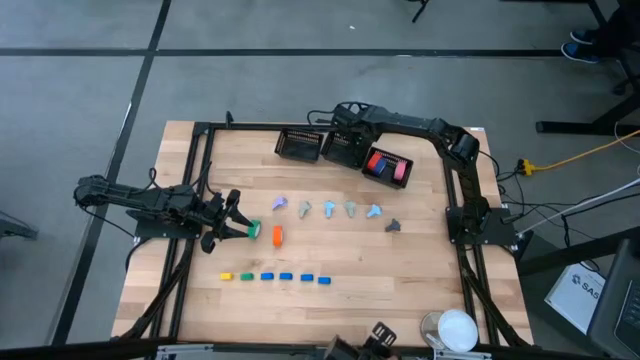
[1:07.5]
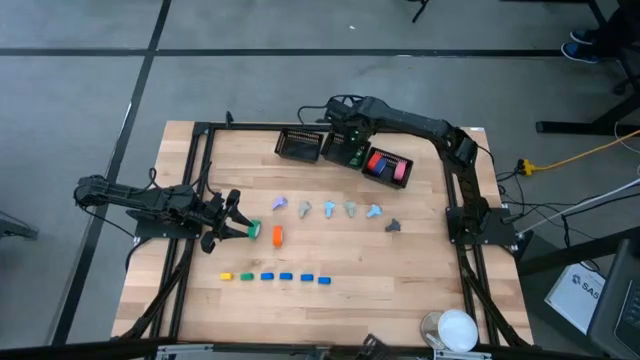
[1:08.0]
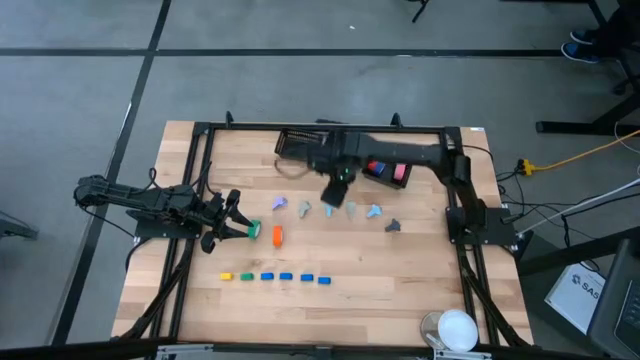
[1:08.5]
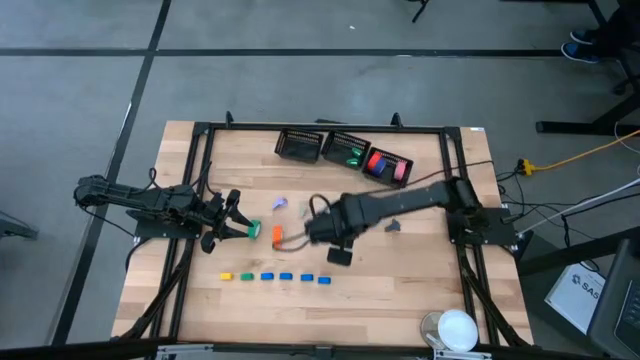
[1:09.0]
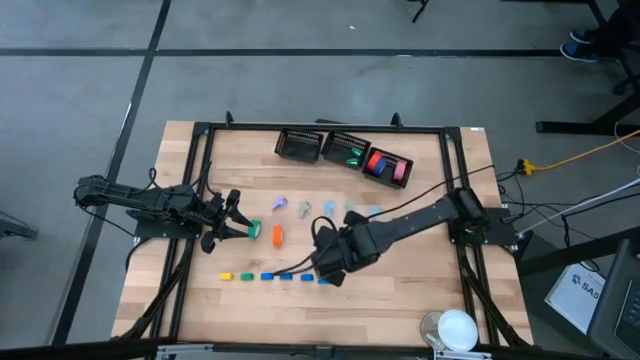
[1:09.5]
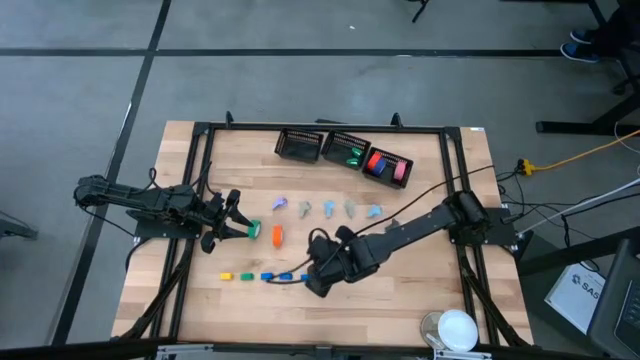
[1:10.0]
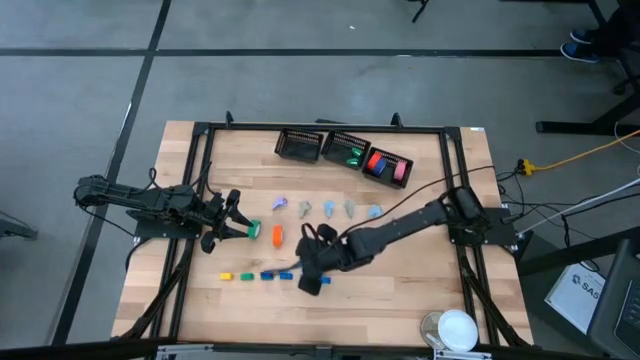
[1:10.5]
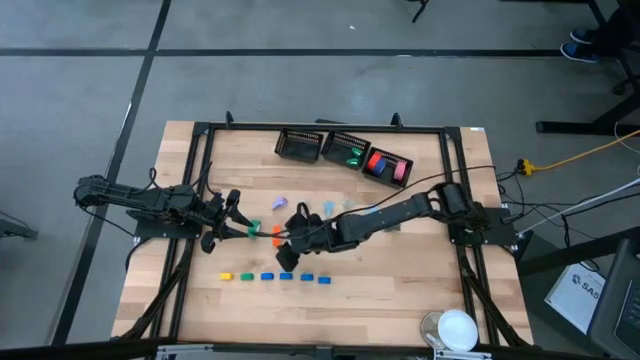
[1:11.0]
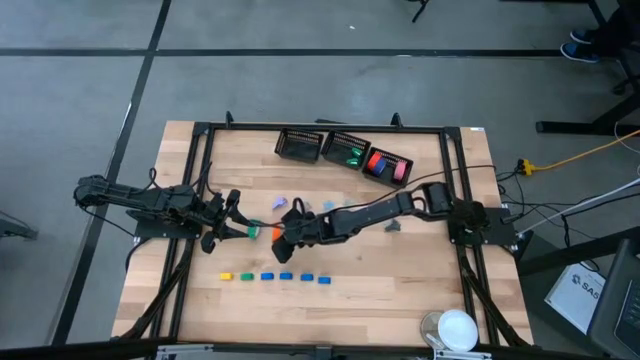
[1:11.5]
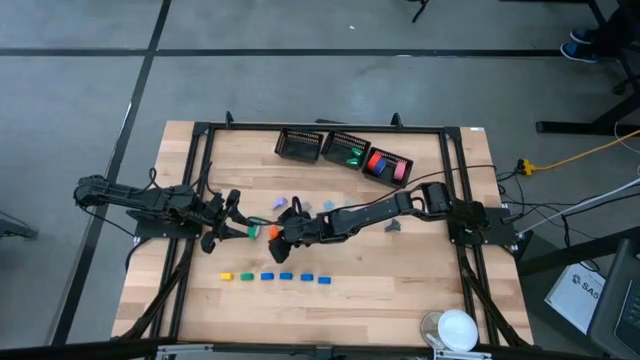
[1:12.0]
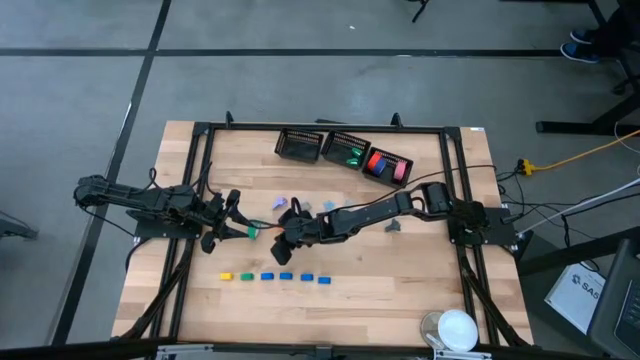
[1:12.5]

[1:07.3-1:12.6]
Task: Pick and place Stapler, Stapler remover, tape
Put the orange tape into the right black bin

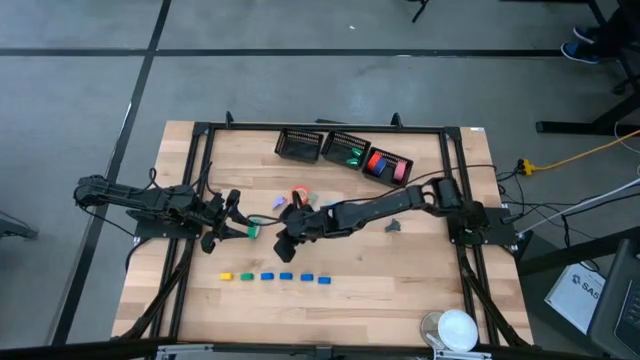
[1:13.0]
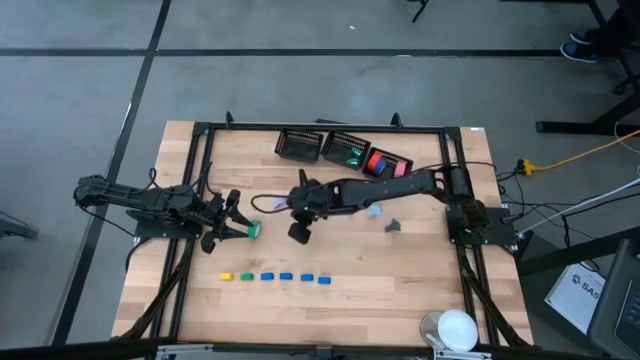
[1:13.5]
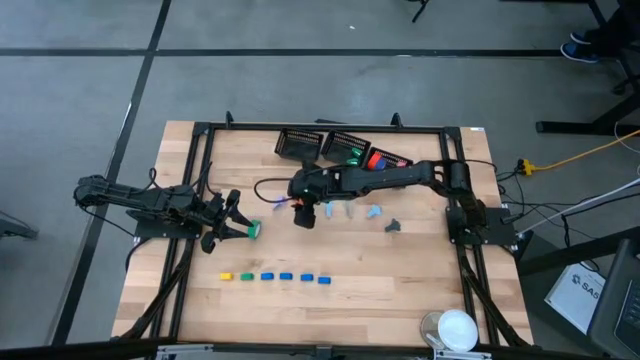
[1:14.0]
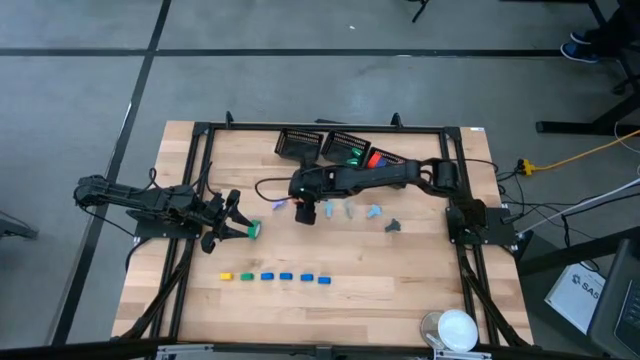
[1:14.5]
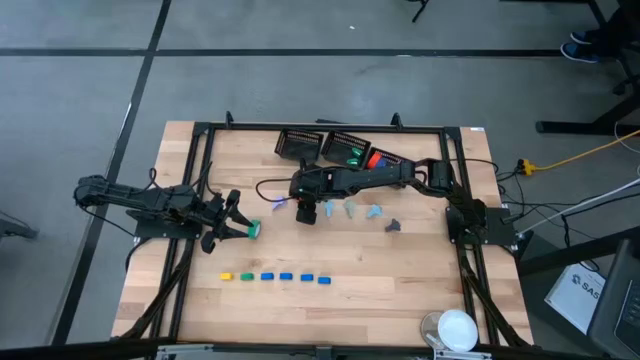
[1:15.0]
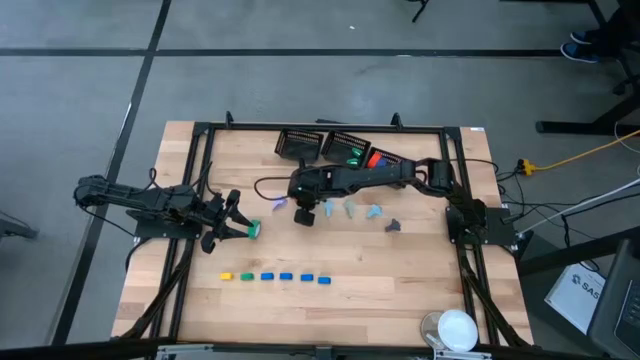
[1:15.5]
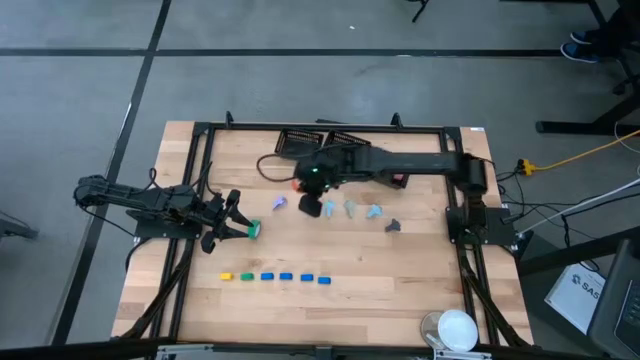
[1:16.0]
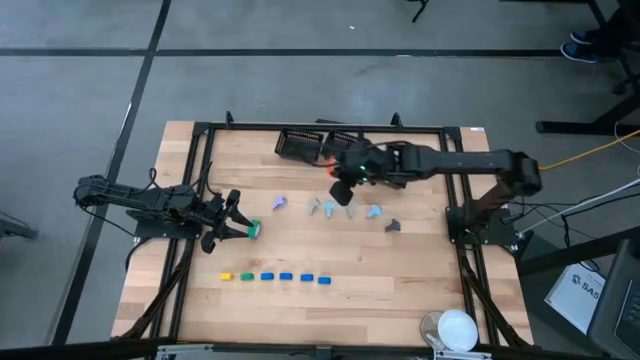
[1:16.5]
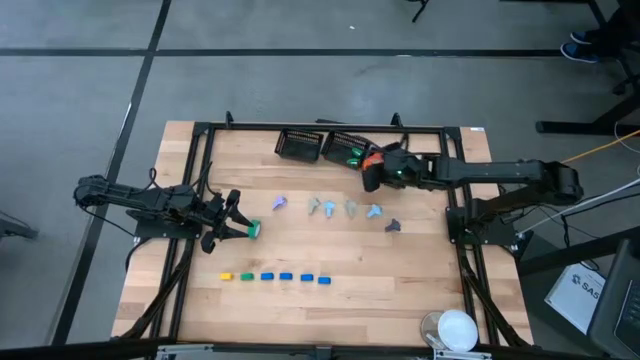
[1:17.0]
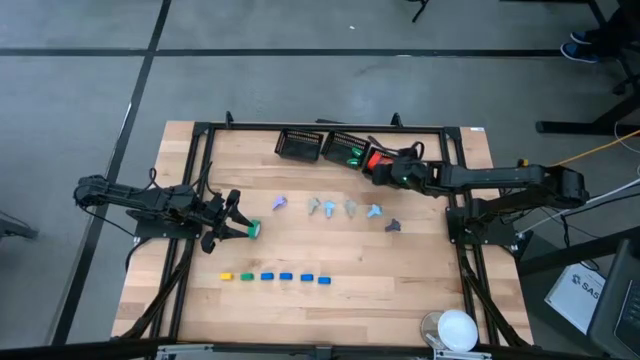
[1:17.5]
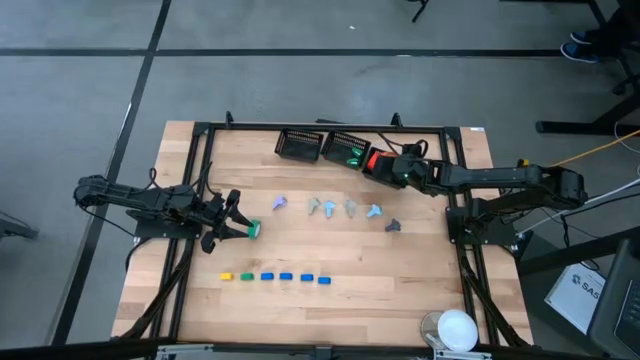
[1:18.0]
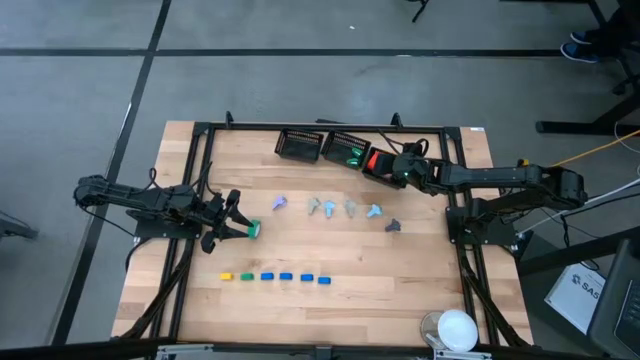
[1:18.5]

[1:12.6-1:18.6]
Put the orange tape into the right black bin

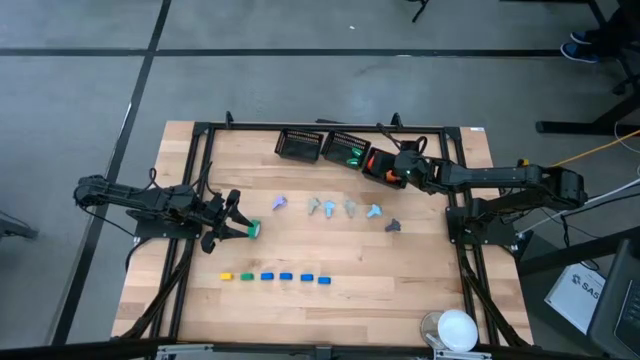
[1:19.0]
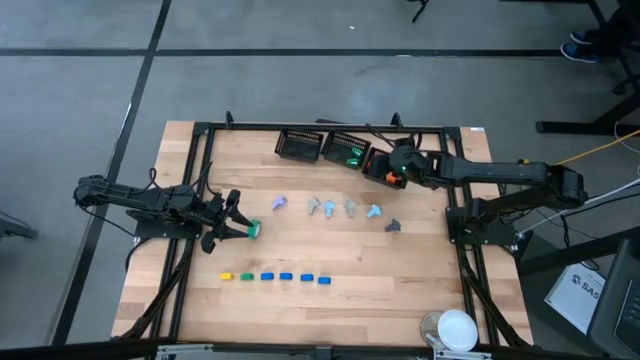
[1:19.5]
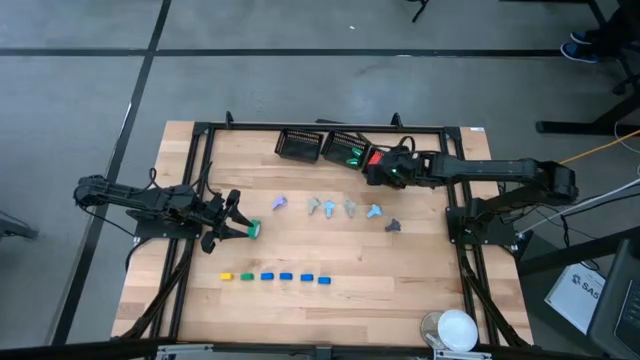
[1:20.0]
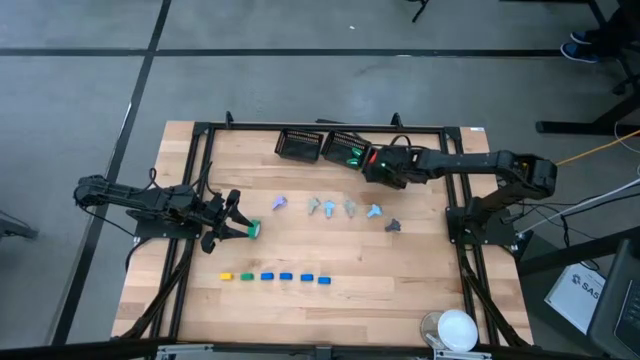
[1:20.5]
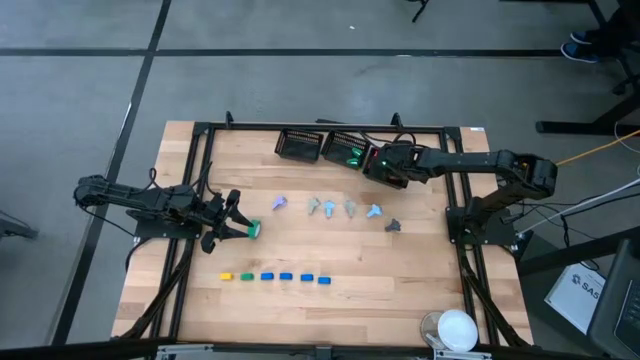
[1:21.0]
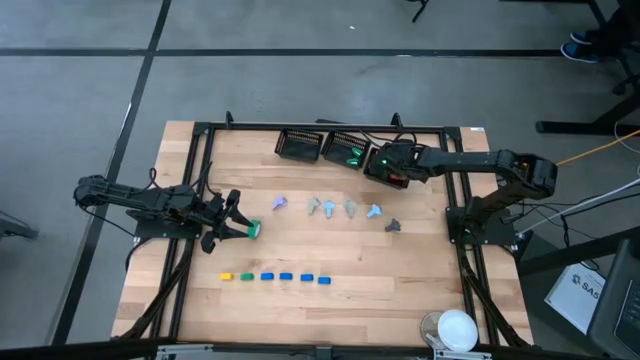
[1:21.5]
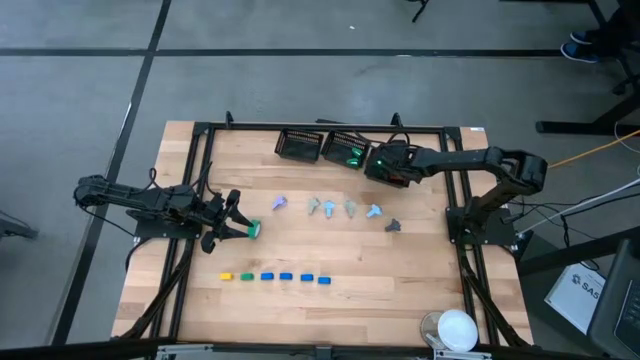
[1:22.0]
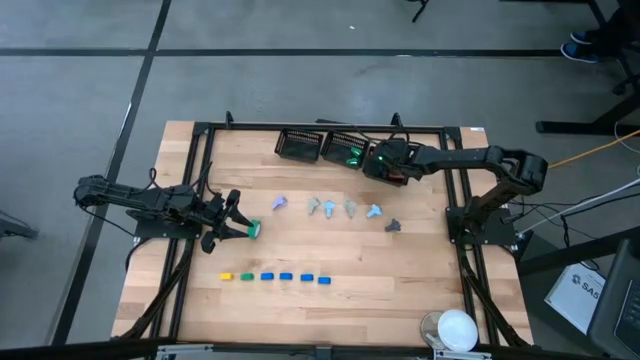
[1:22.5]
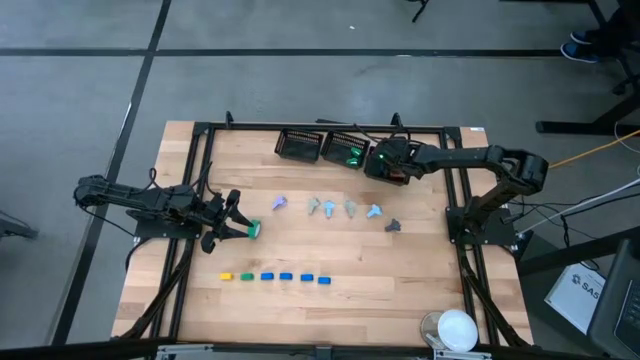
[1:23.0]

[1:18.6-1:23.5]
Adjust the blue tape in the right black bin

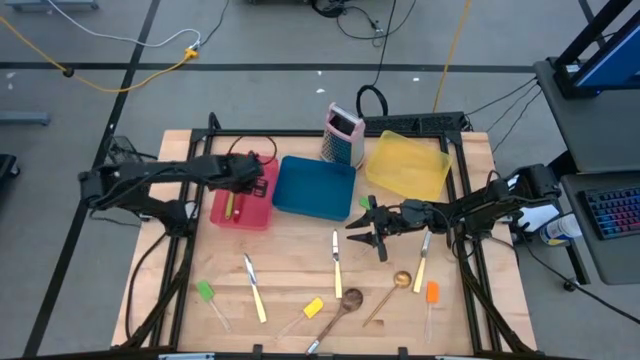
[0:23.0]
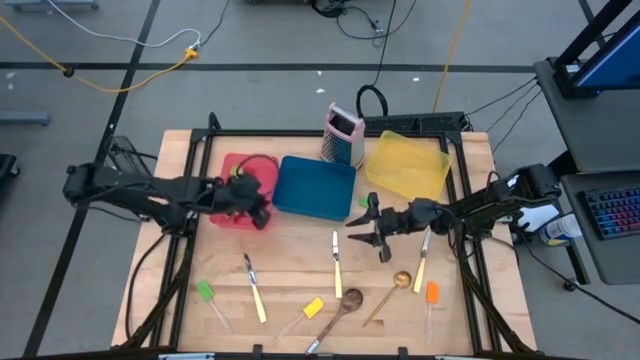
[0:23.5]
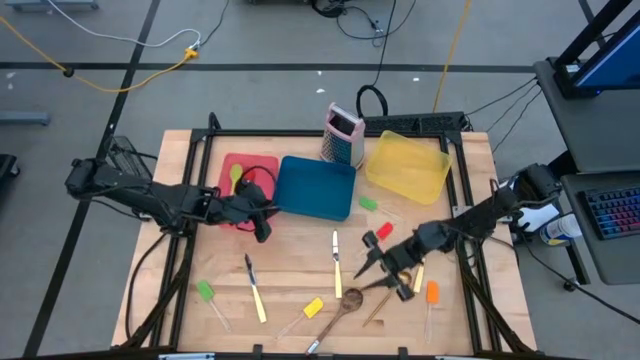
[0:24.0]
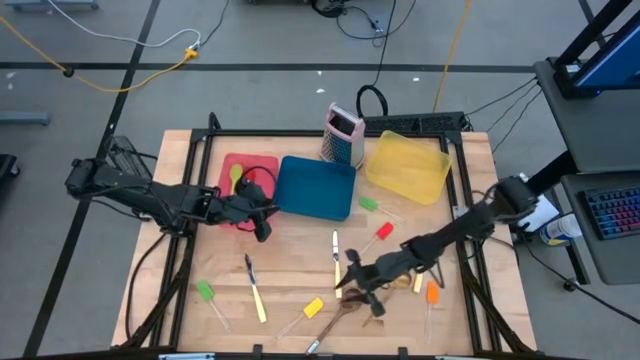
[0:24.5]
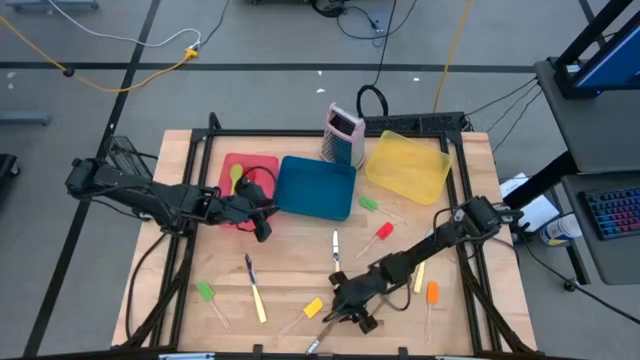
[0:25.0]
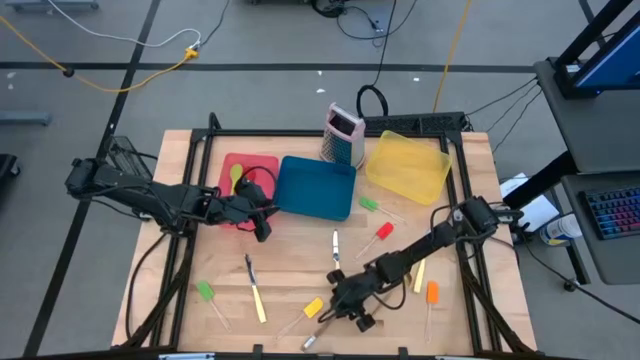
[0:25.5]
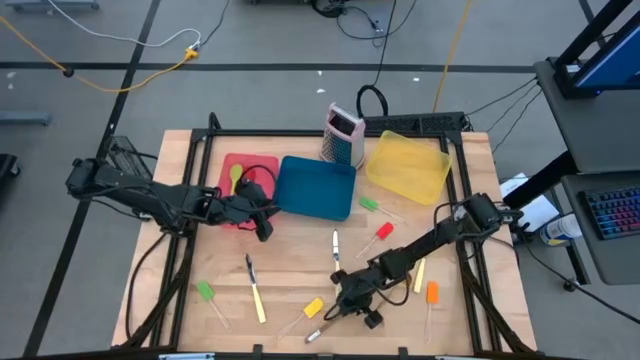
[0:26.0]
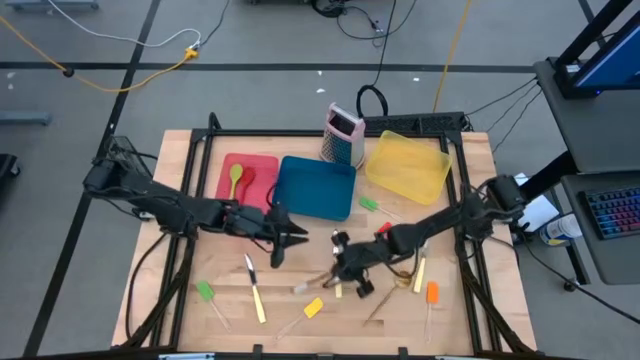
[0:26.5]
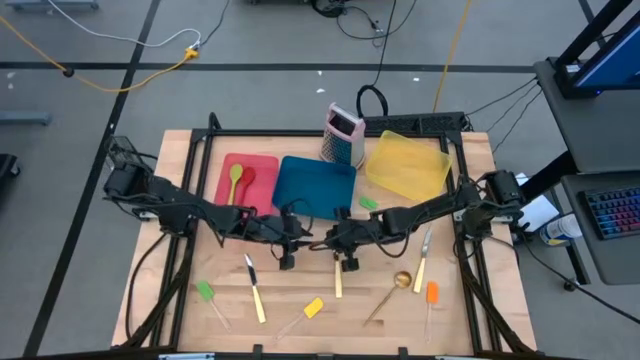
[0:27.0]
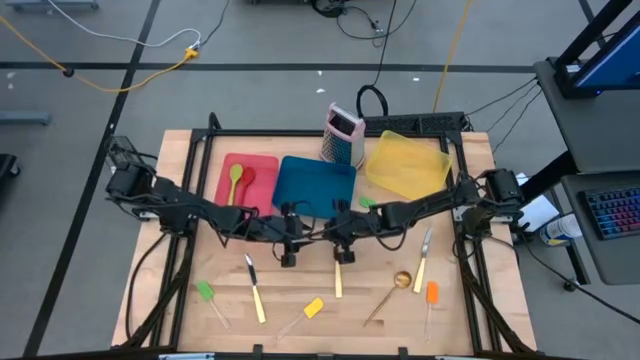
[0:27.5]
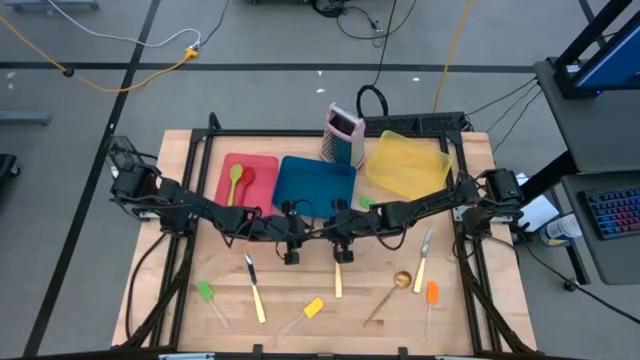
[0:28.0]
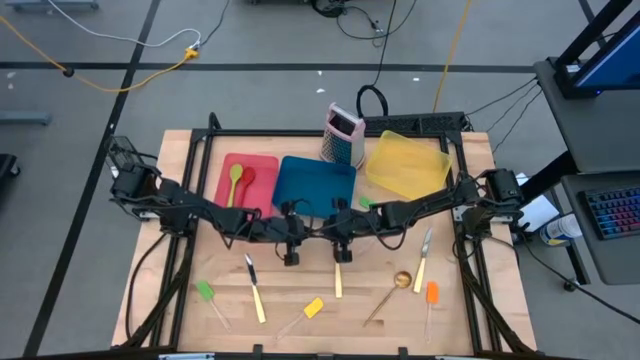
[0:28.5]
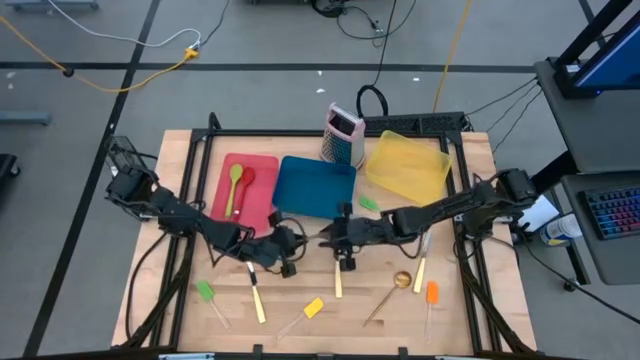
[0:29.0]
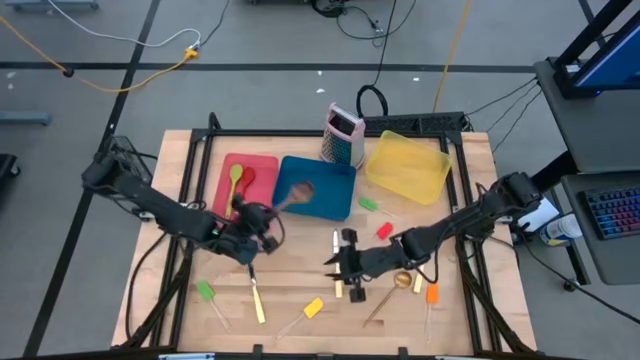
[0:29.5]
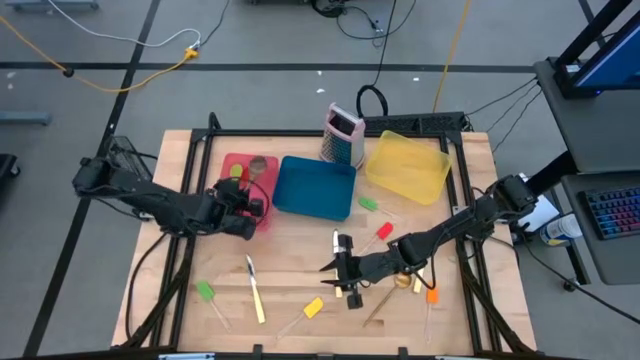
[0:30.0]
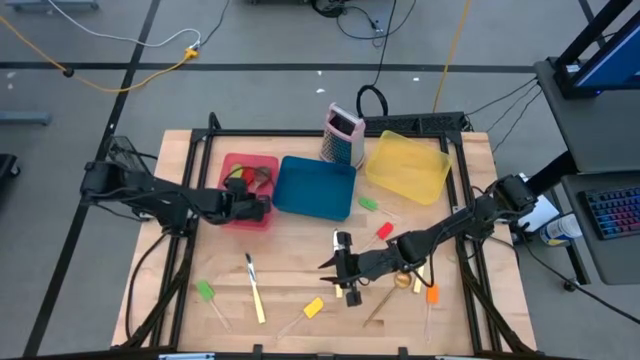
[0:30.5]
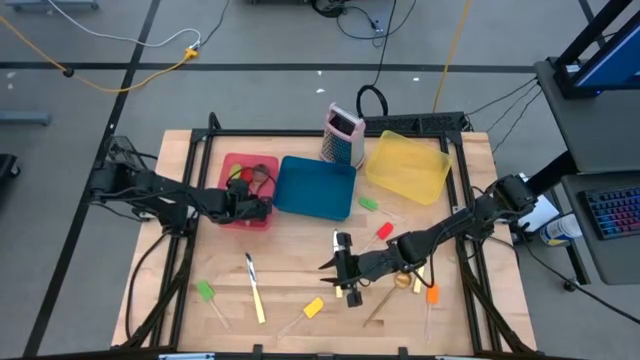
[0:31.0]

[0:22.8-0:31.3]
Task: Pick & Place Kitchen Items
Put the brown spoon into the red bin
